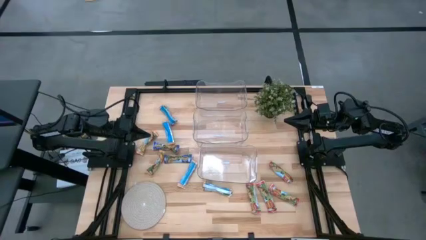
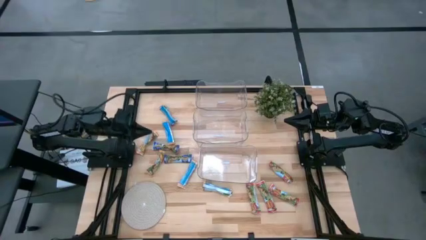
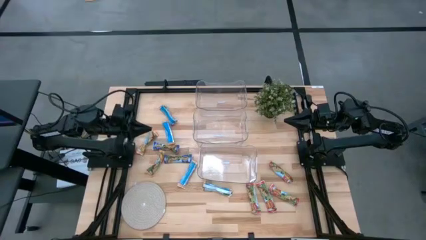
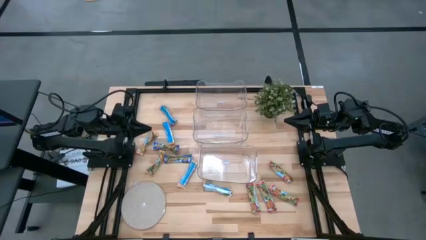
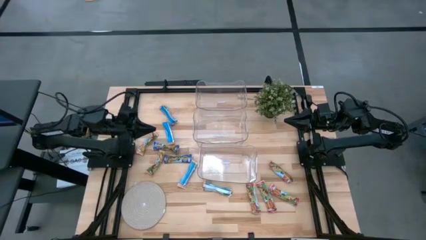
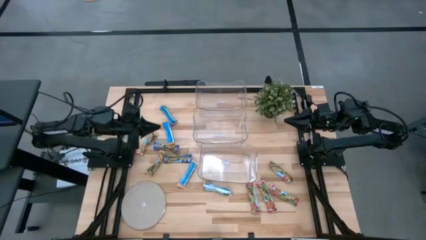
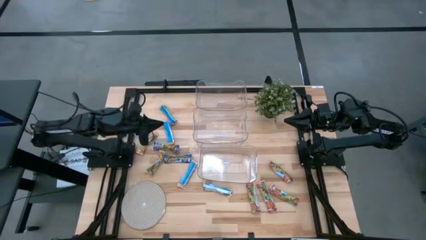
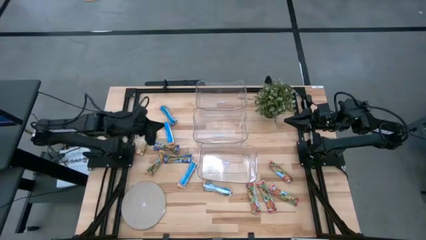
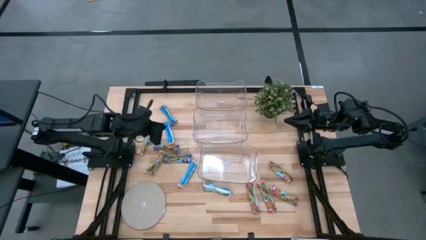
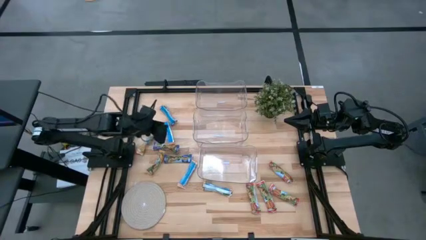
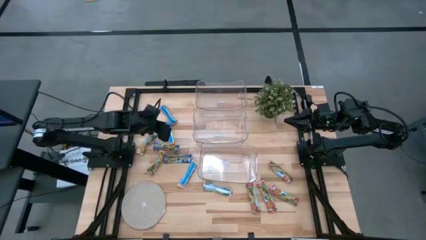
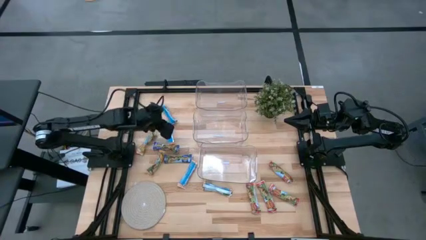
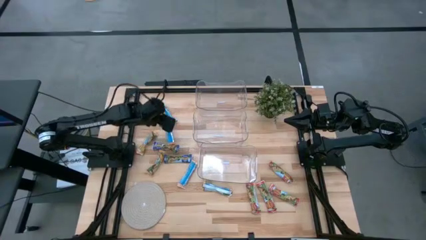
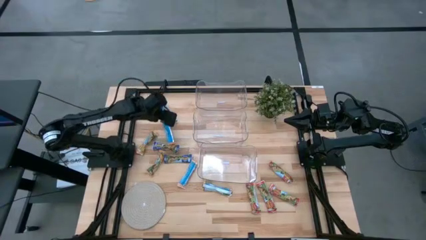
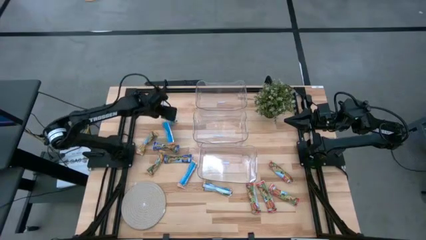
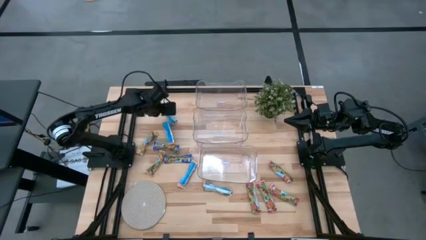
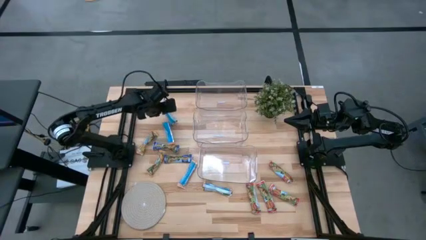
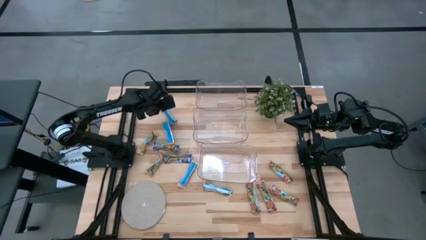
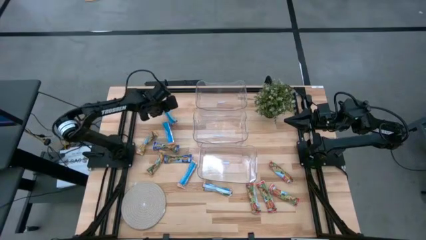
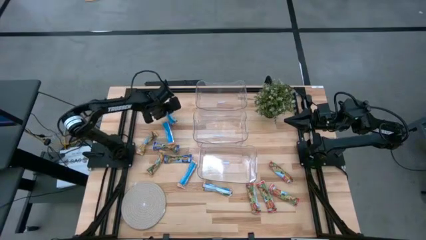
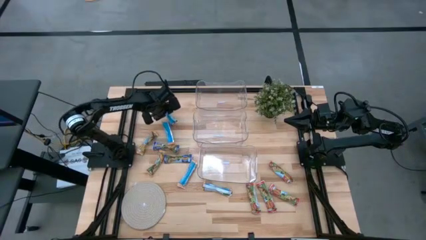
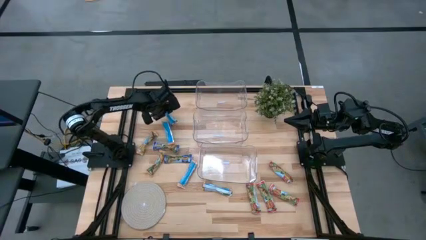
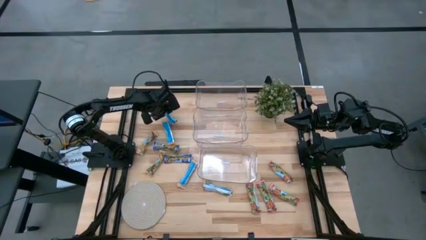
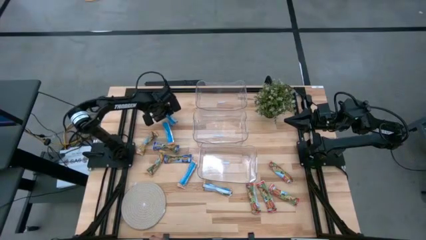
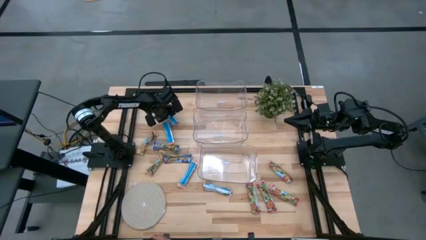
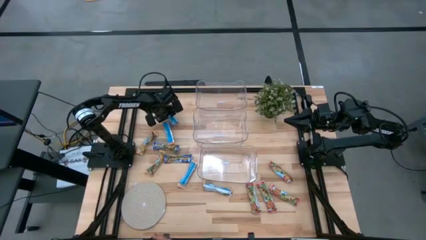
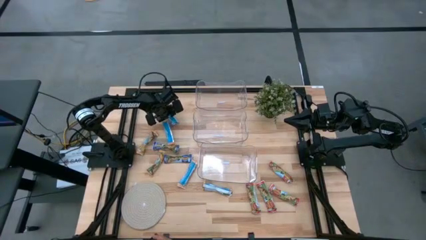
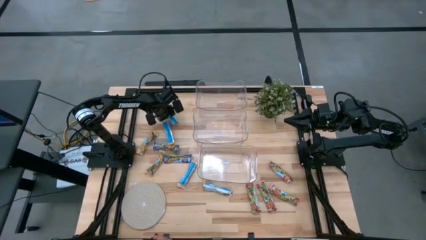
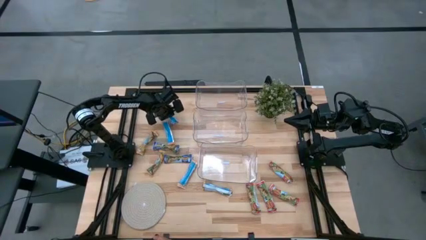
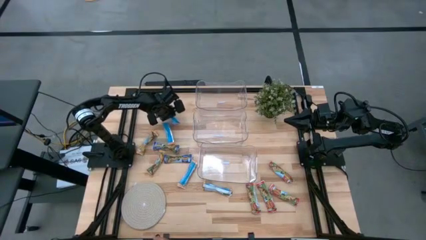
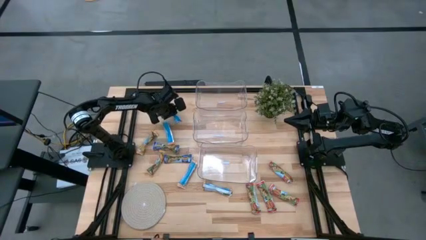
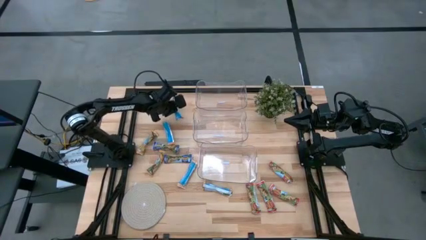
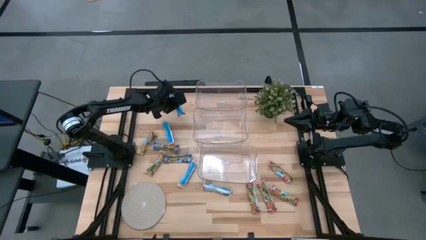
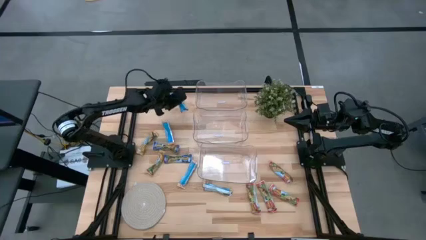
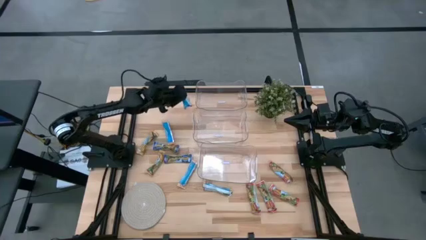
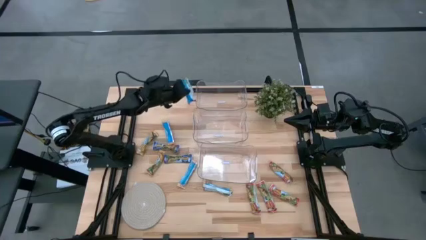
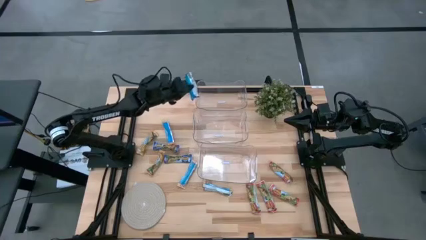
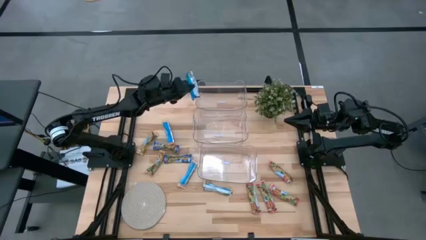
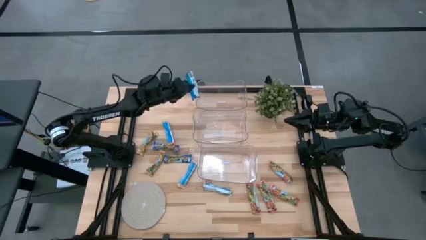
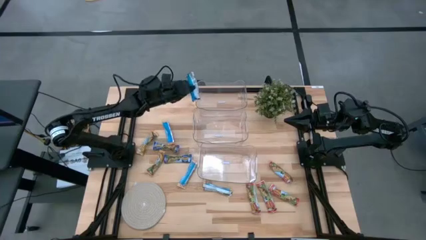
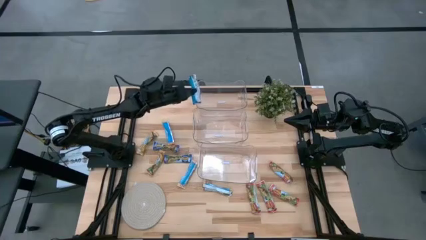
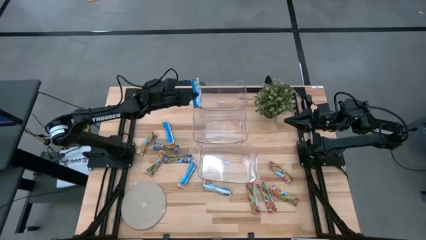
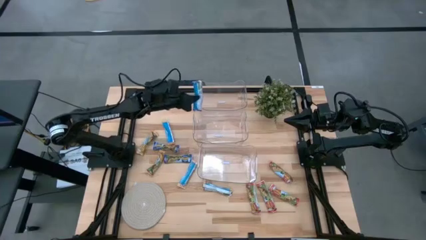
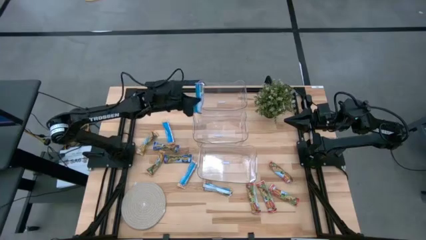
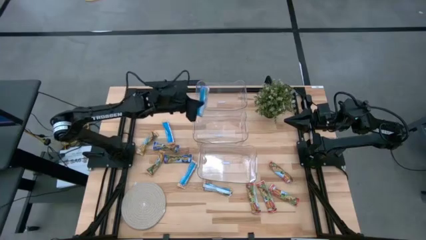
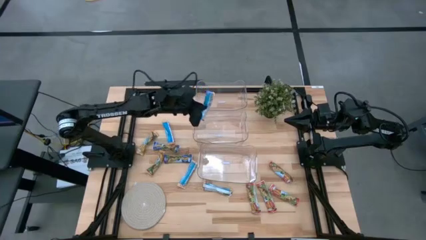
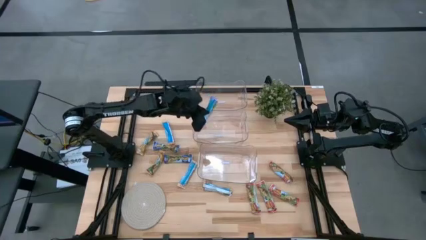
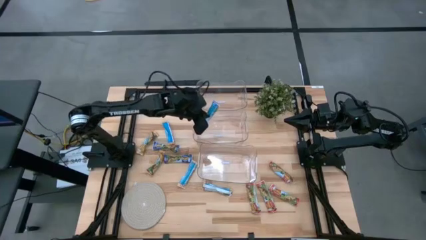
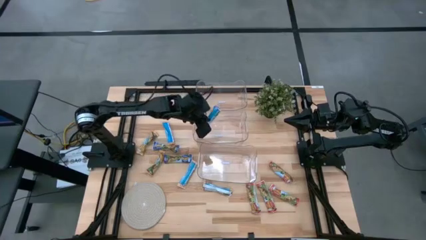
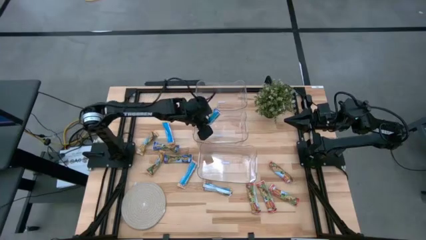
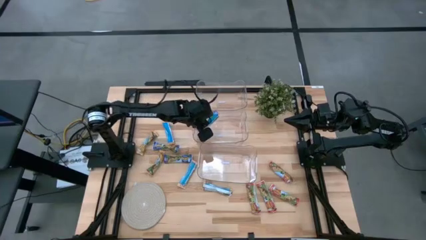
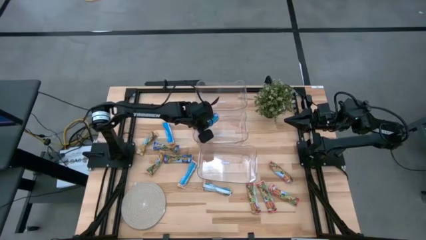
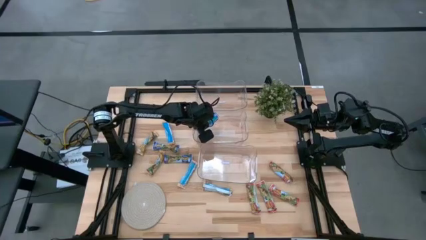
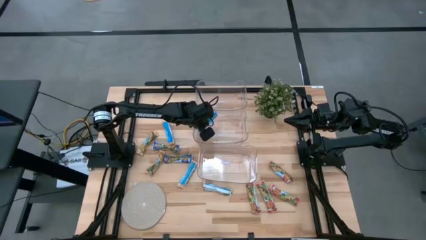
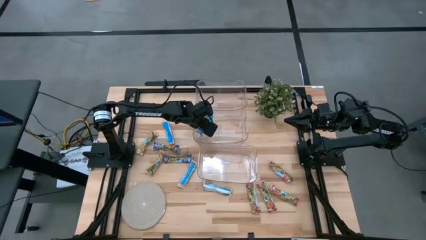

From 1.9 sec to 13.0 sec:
Task: Pick and place Granola Bars by type
Put the blue granola bar into the middle transparent bin

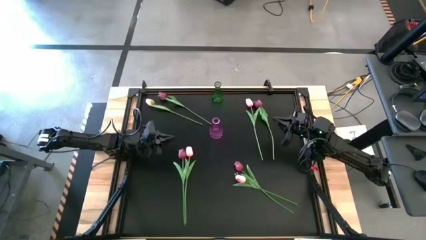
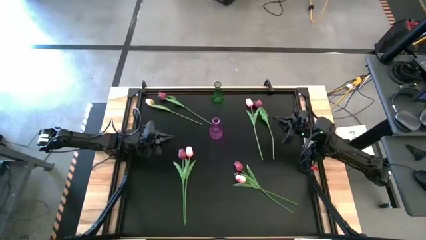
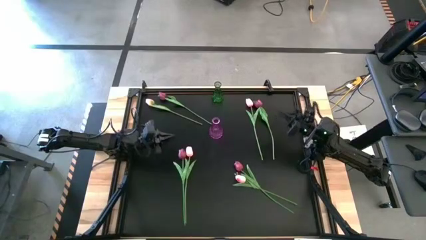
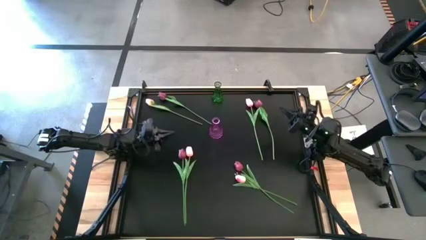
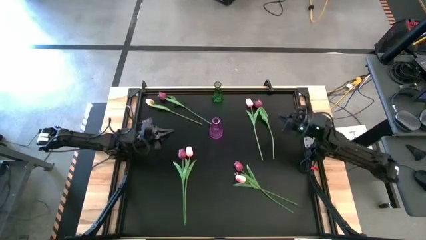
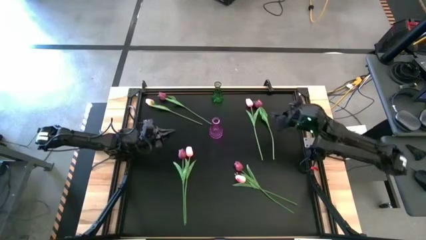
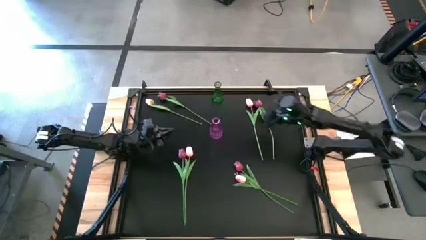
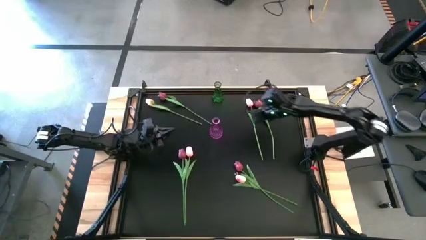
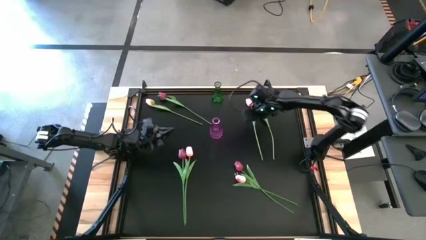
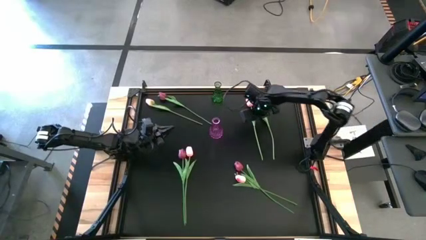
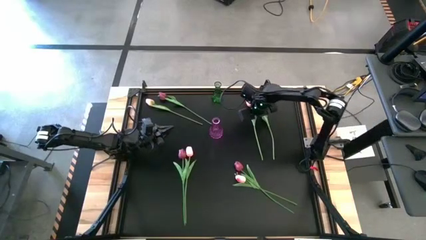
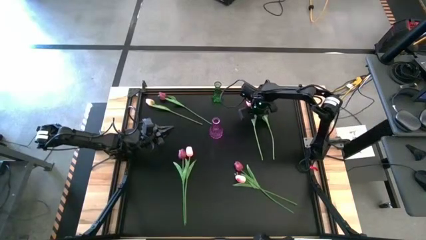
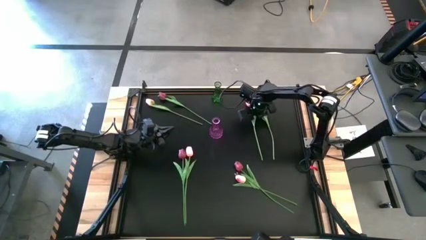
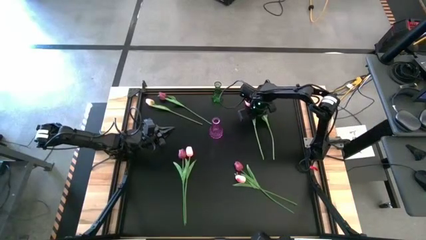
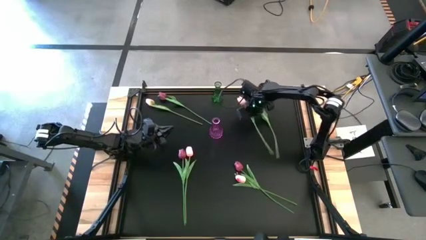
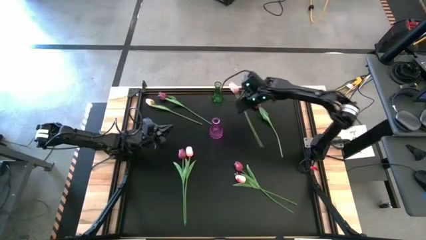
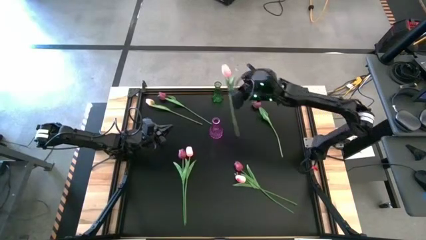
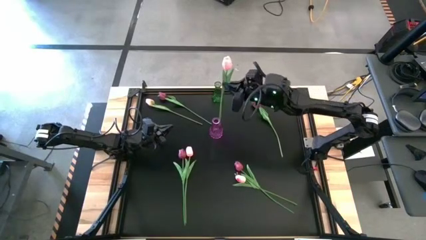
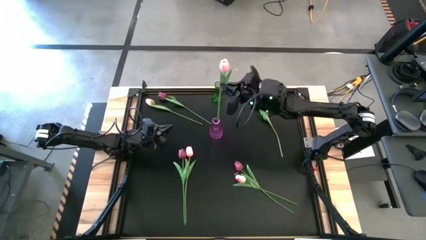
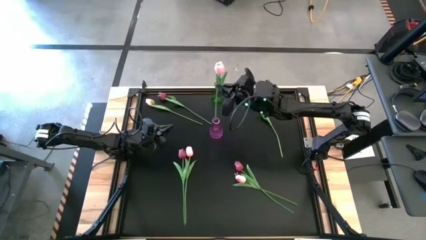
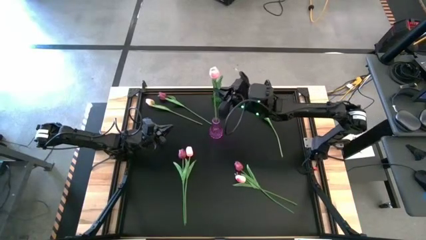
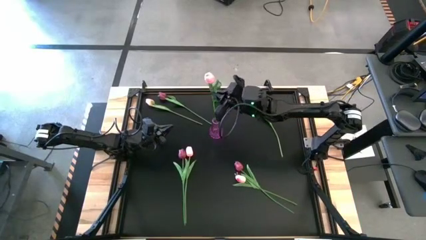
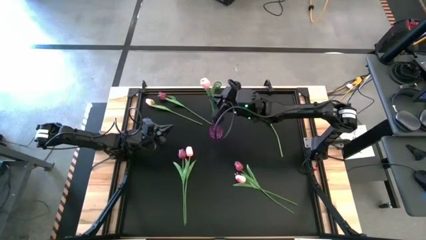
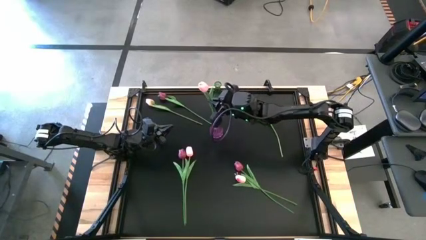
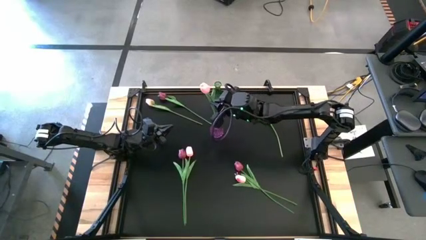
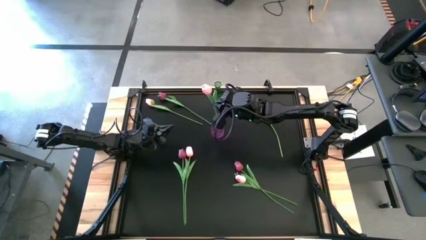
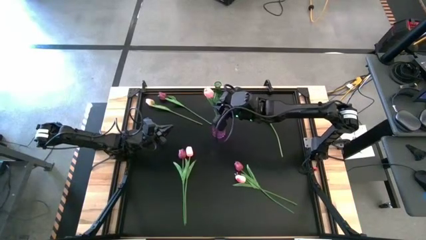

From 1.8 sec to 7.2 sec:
Task: Sort flowers into vase by color
Put the top right pink tulip into the purple vase
